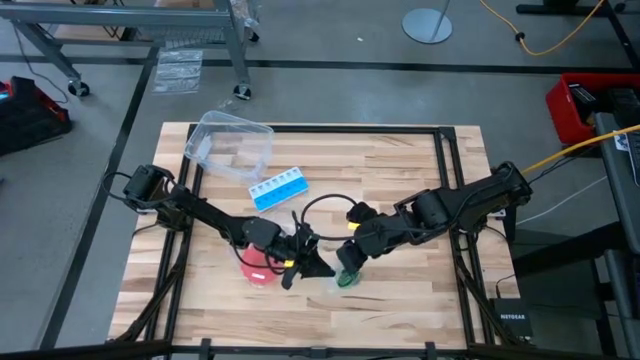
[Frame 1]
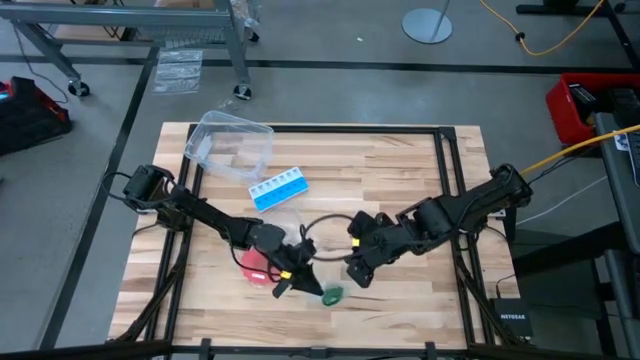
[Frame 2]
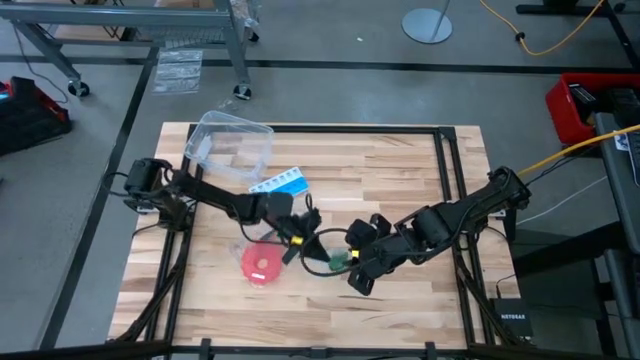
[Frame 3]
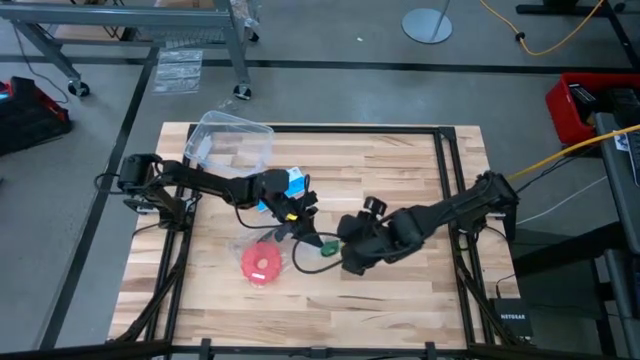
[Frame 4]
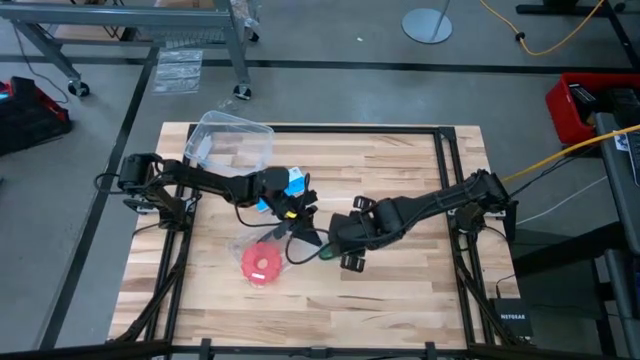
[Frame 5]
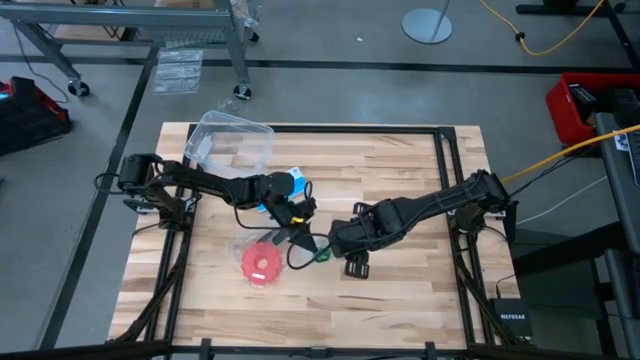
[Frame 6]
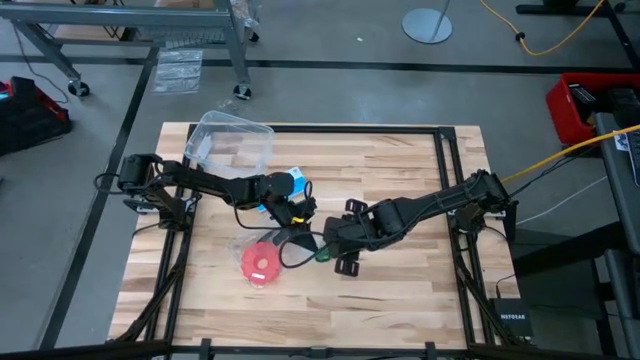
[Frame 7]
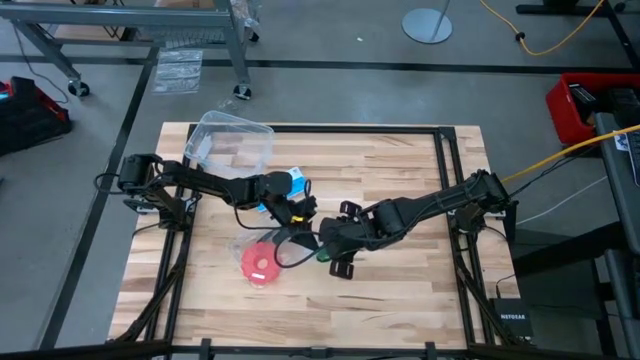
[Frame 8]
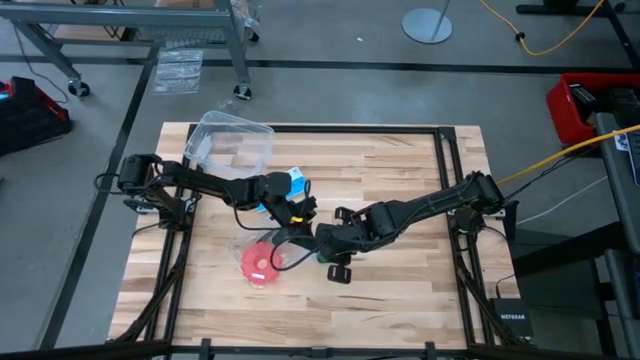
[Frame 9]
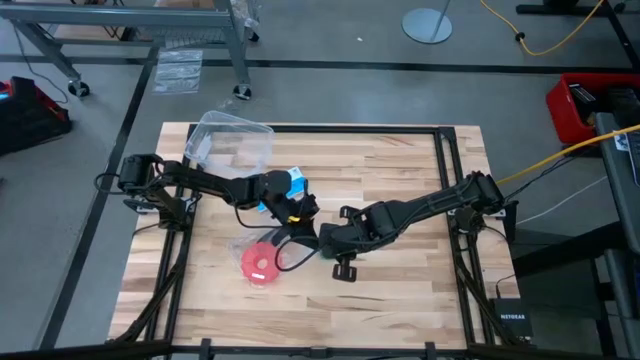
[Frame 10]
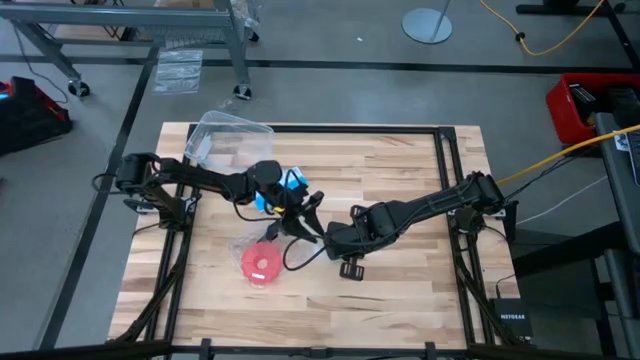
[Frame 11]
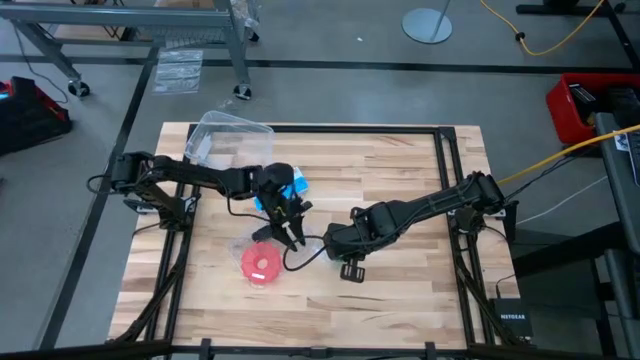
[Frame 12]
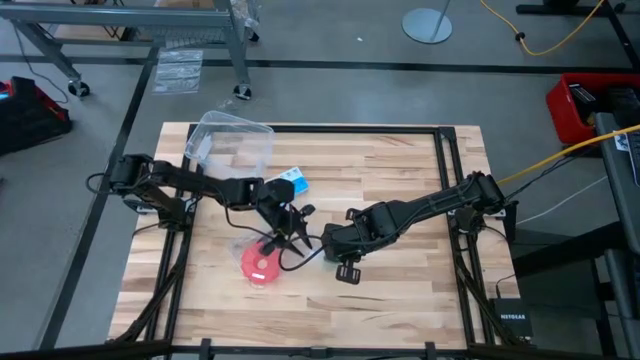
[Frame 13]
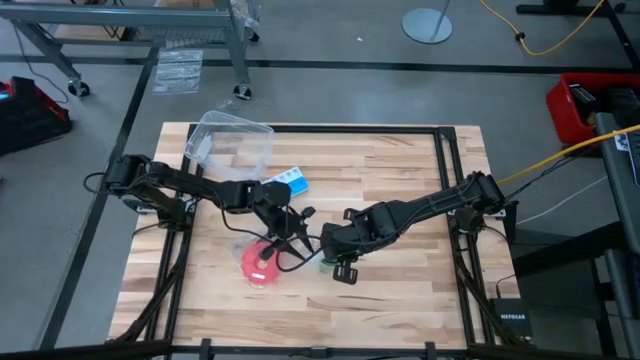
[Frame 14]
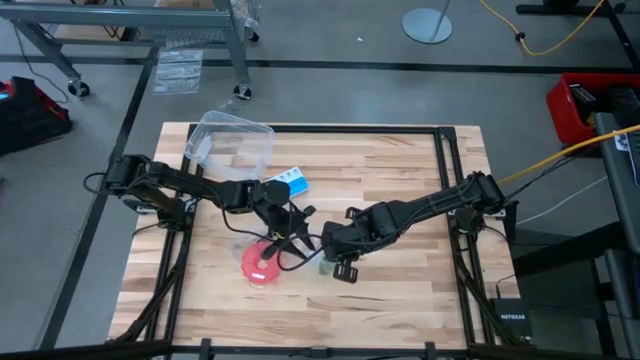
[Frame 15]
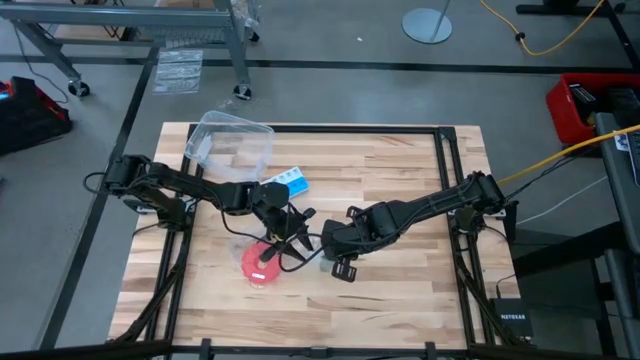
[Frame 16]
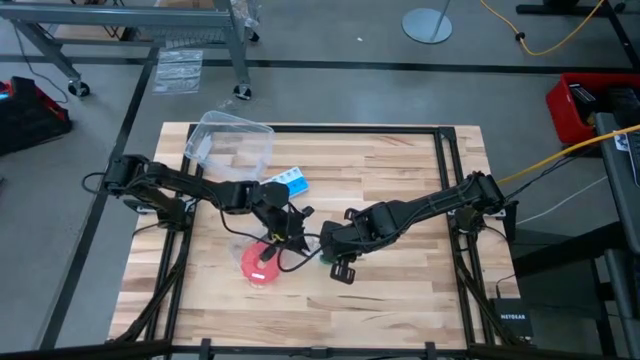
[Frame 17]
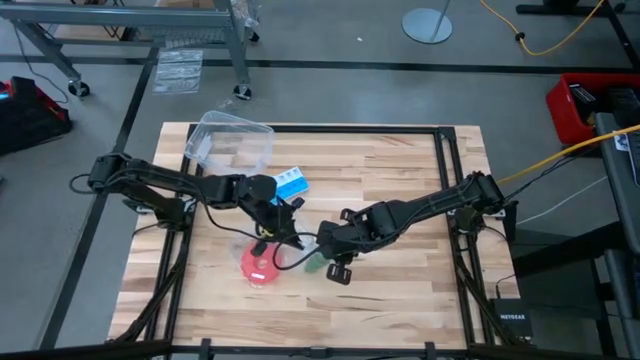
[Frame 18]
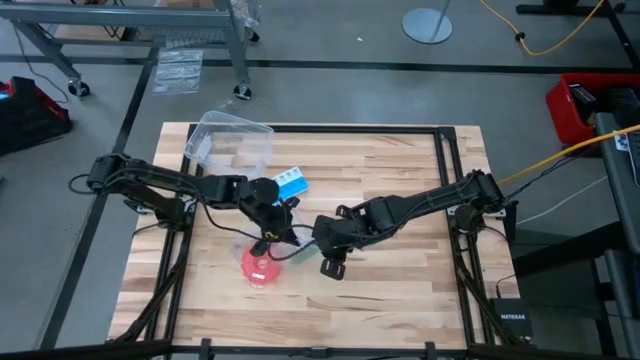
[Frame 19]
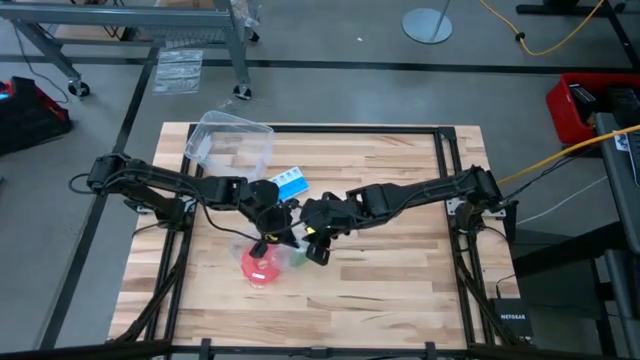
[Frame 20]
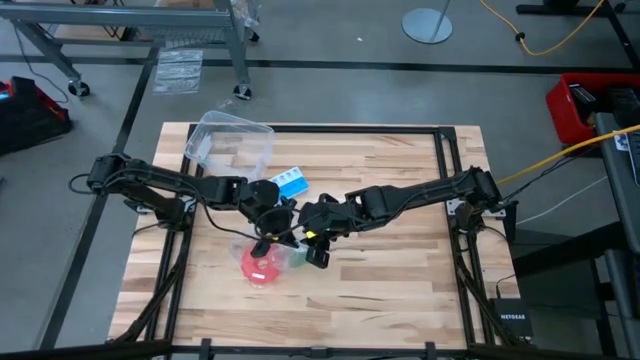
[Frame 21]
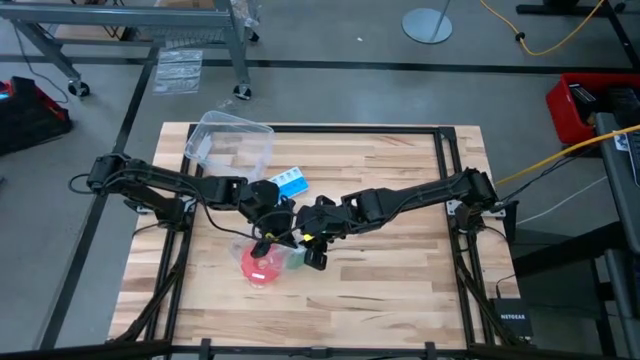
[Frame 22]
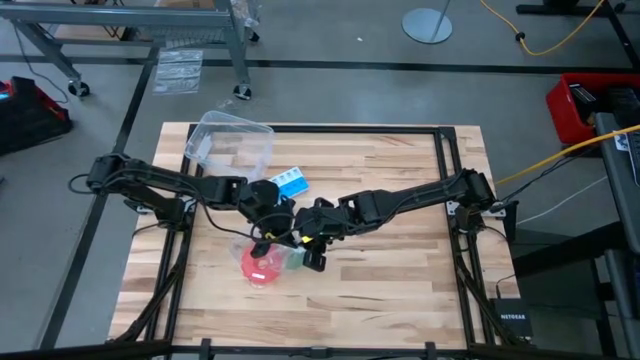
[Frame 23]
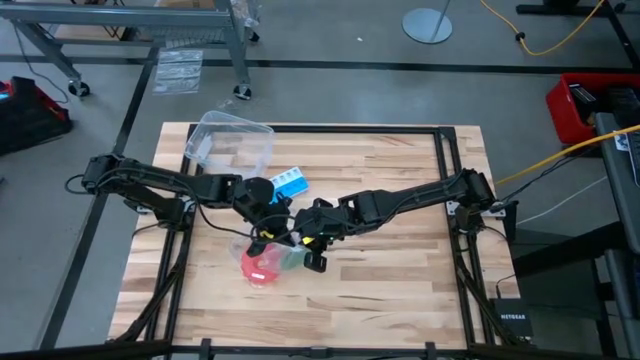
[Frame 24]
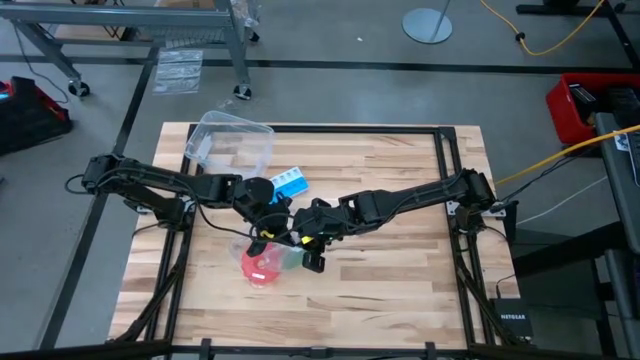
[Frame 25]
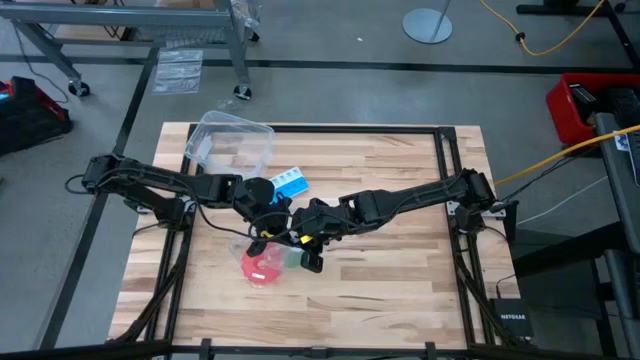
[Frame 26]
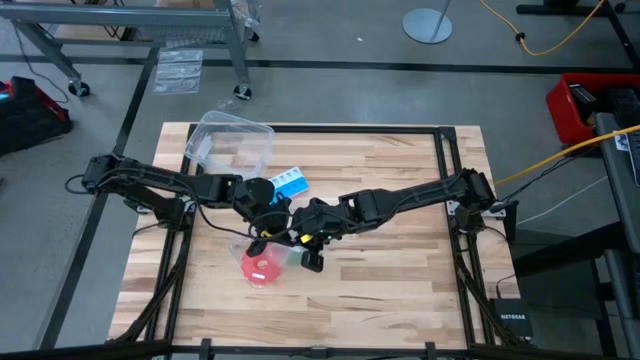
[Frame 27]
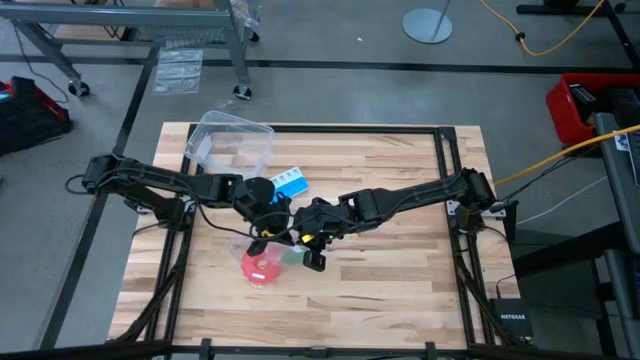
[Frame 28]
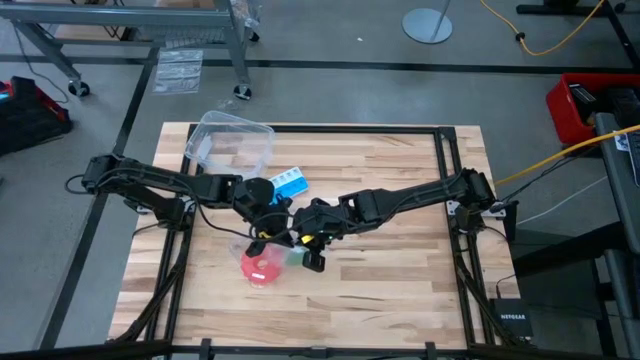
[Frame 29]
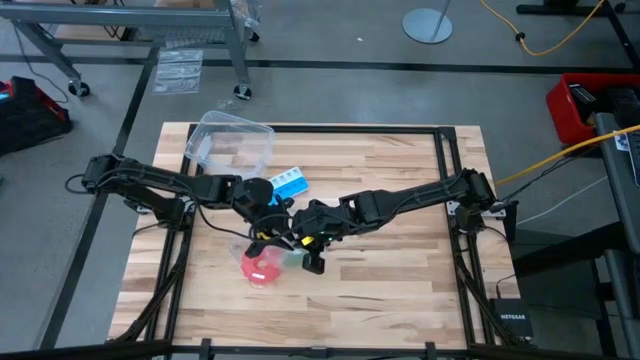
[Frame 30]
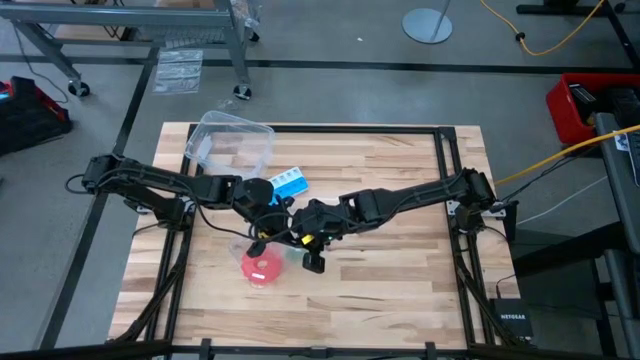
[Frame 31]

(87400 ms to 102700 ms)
Task: Roll bandage
Close the transparent zip bag

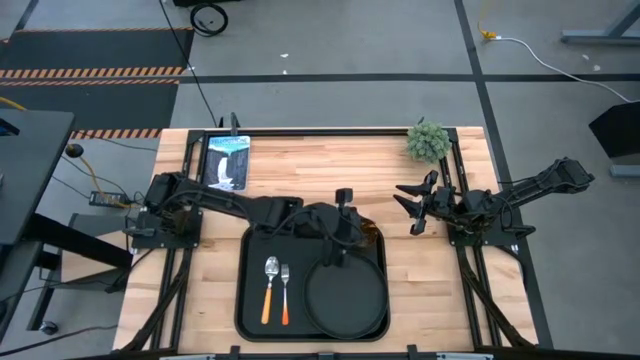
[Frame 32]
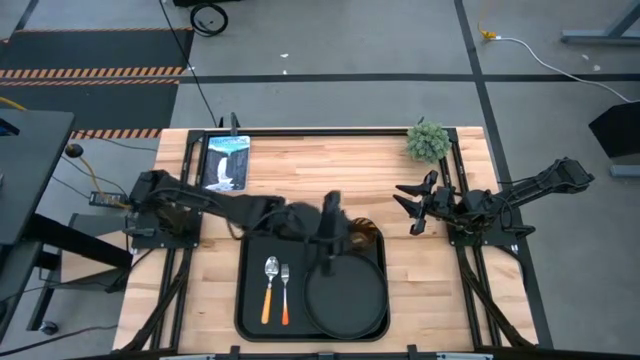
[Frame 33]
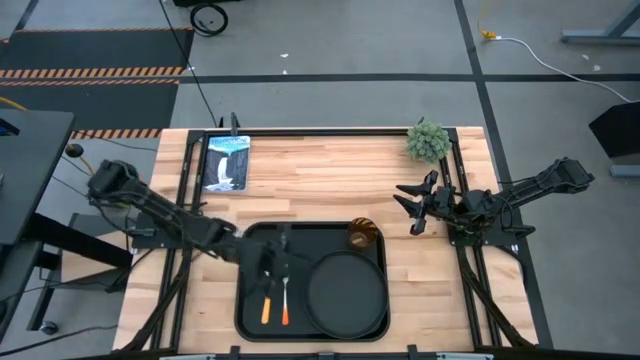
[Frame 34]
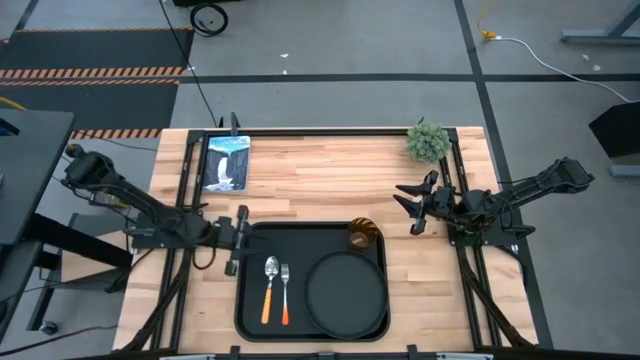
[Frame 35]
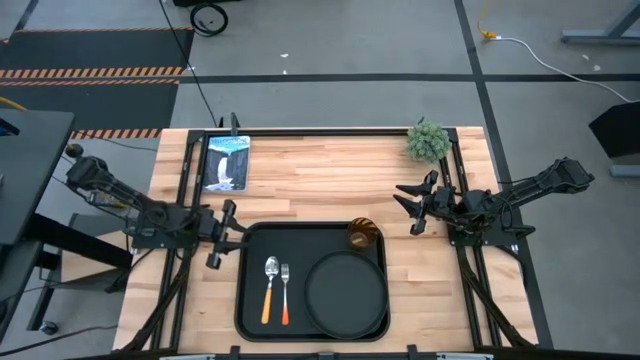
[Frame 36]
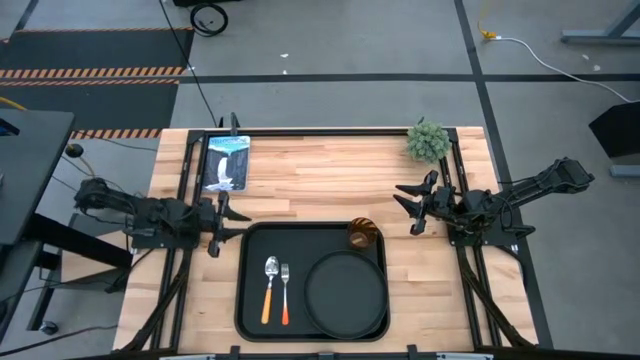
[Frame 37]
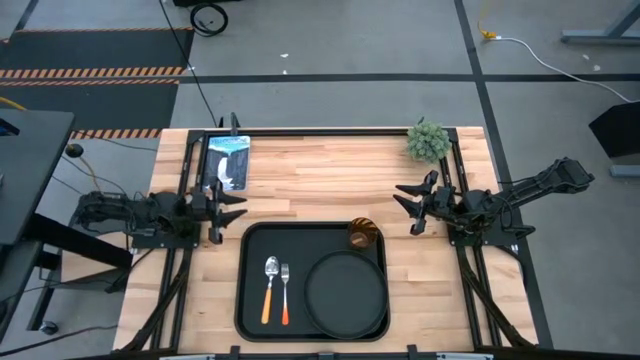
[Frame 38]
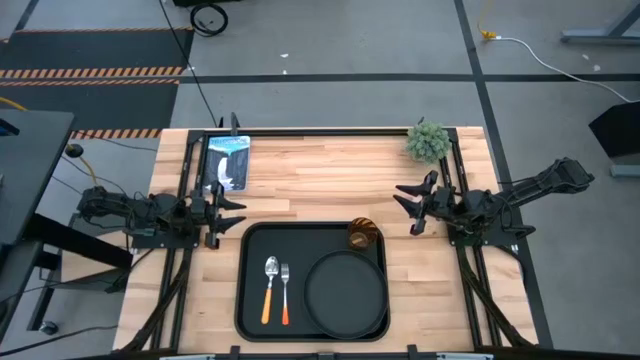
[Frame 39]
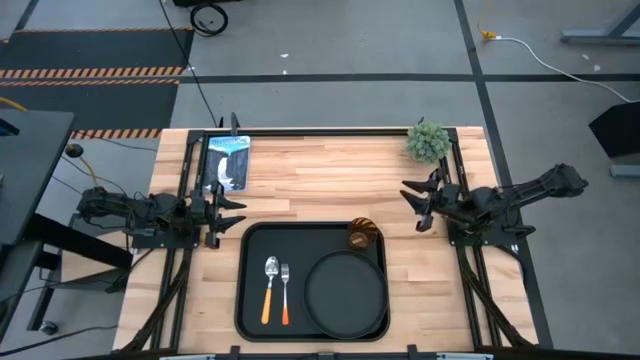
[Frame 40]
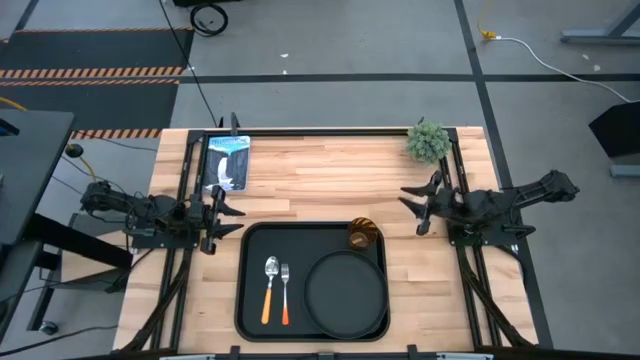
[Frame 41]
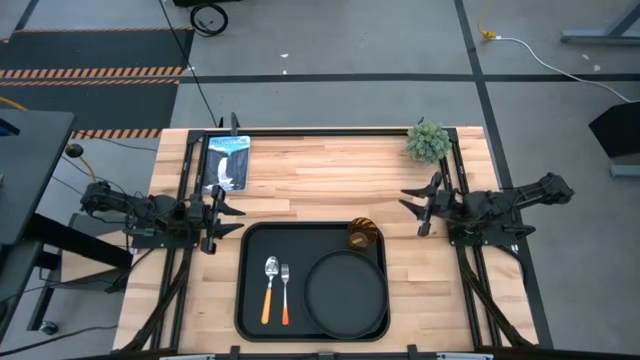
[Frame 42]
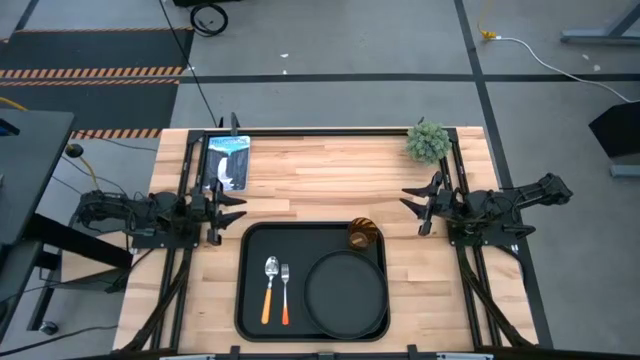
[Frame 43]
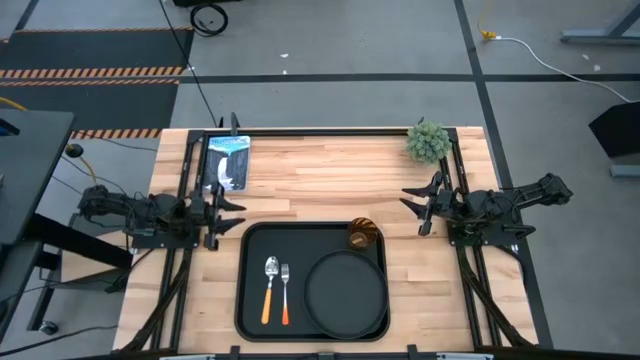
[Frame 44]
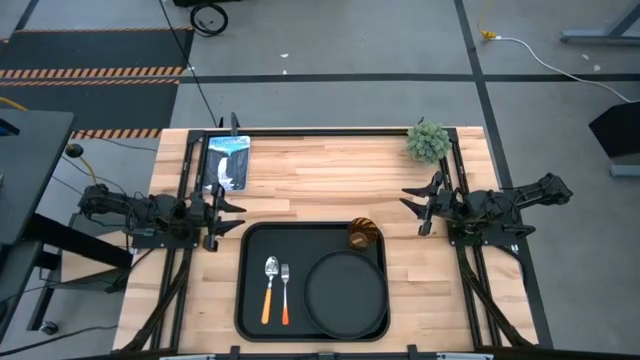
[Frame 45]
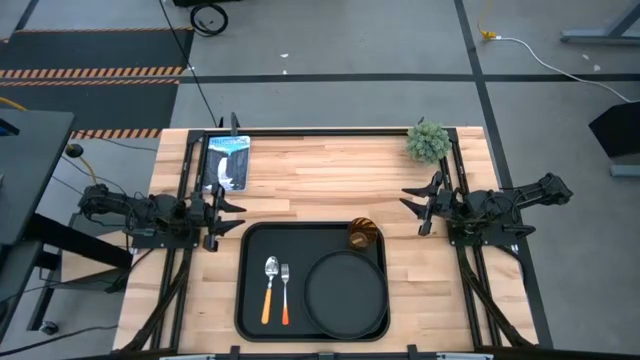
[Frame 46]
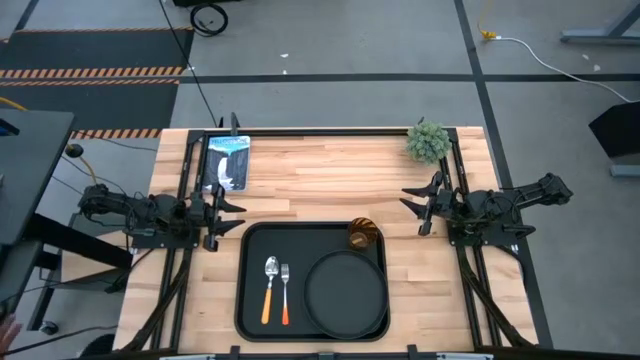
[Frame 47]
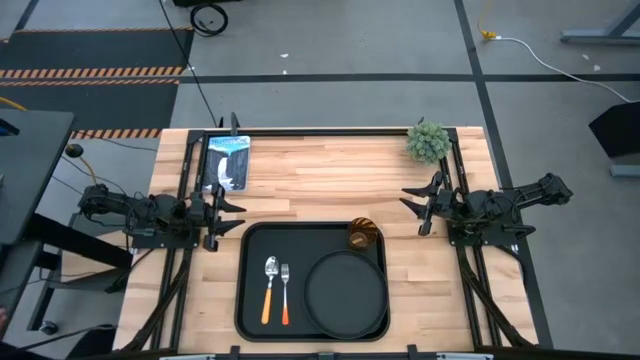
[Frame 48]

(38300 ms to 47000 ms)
Task: Pick and place plate/cup/fork/spoon on tray
Return to Home Position
